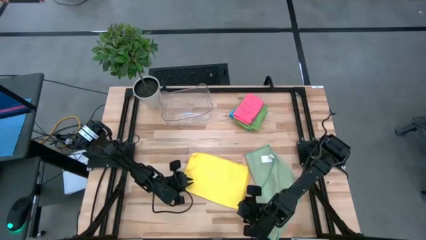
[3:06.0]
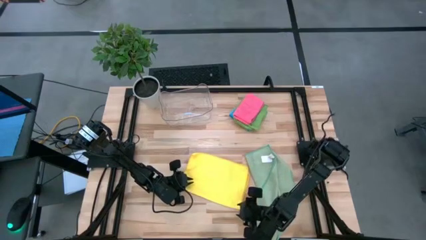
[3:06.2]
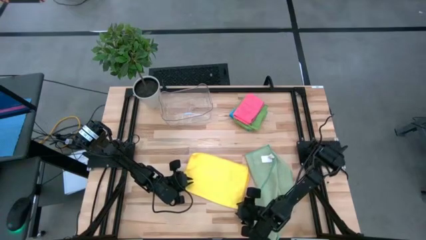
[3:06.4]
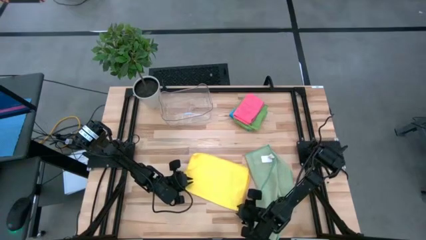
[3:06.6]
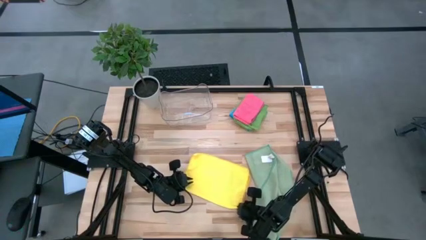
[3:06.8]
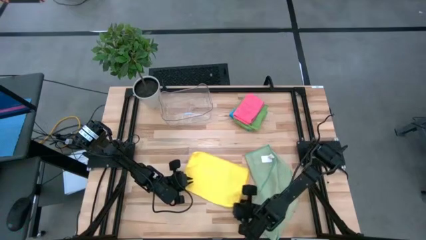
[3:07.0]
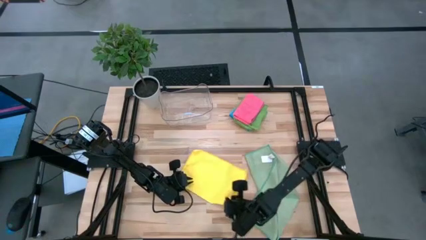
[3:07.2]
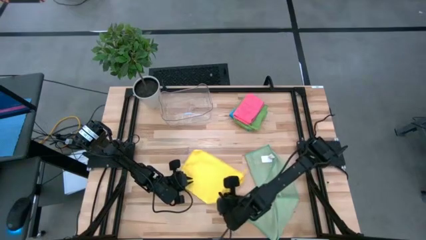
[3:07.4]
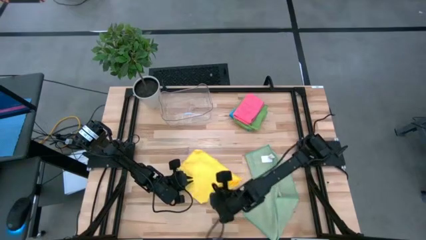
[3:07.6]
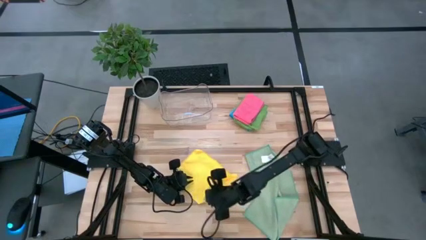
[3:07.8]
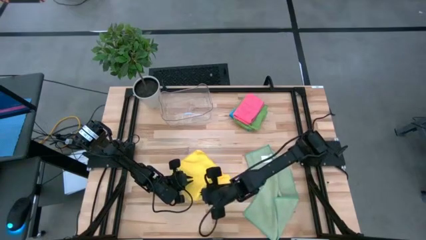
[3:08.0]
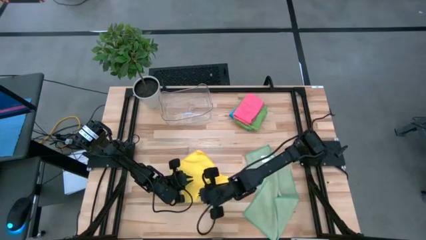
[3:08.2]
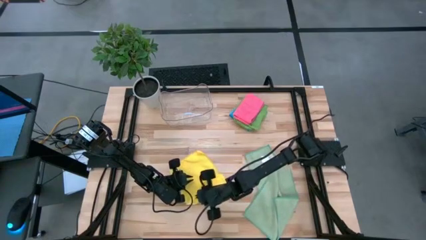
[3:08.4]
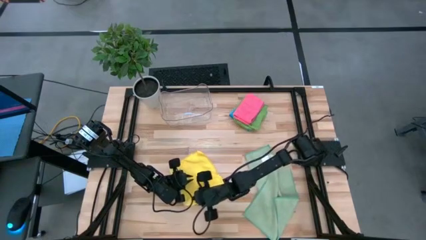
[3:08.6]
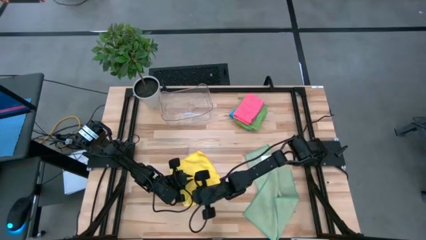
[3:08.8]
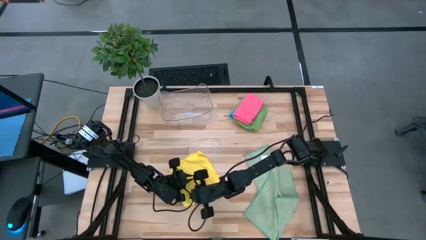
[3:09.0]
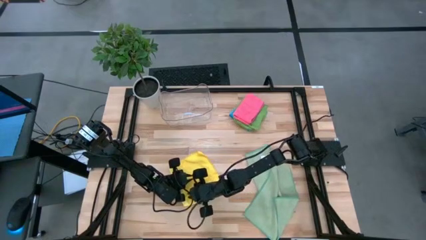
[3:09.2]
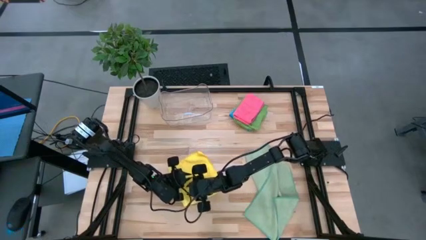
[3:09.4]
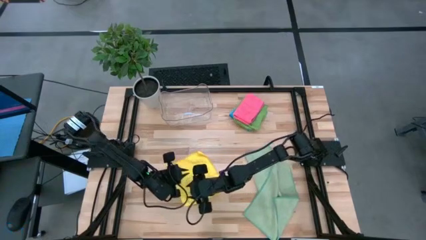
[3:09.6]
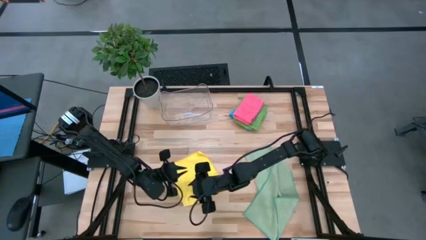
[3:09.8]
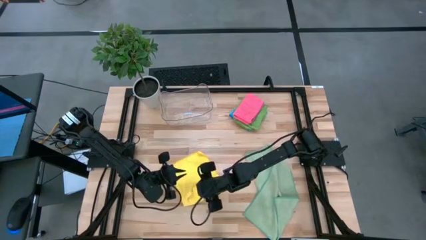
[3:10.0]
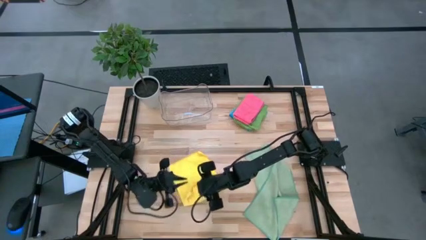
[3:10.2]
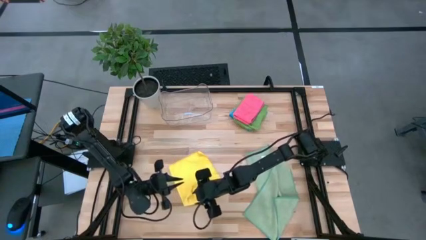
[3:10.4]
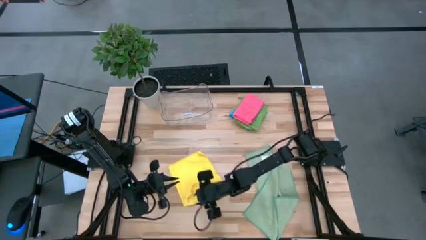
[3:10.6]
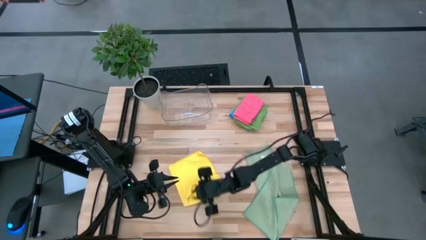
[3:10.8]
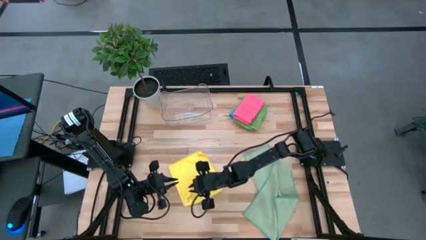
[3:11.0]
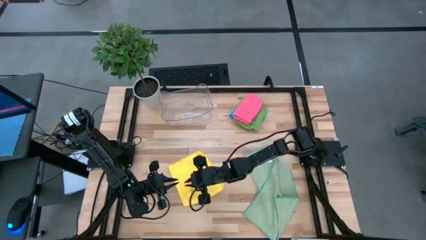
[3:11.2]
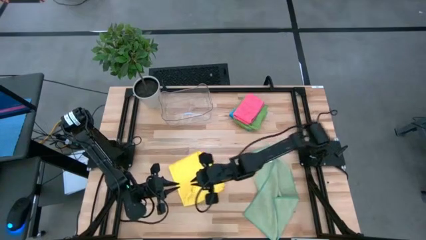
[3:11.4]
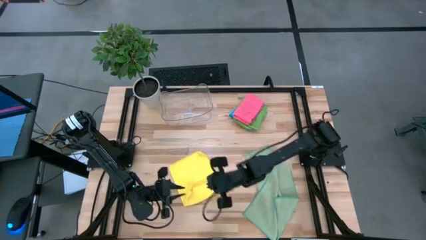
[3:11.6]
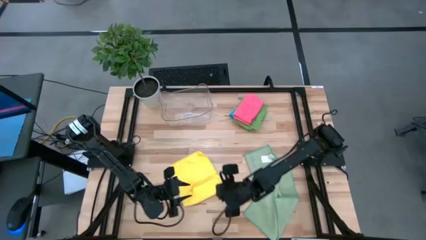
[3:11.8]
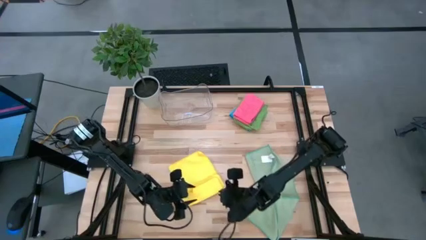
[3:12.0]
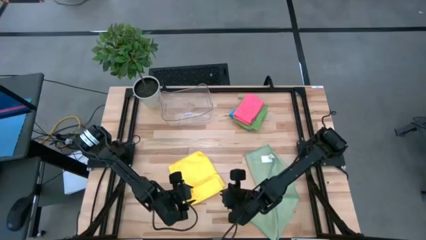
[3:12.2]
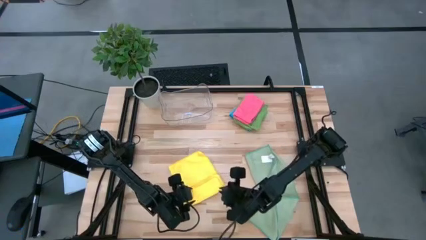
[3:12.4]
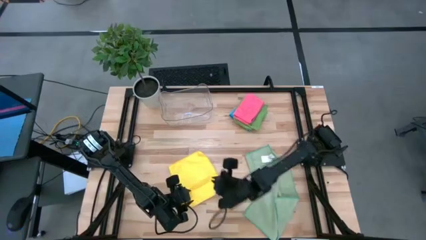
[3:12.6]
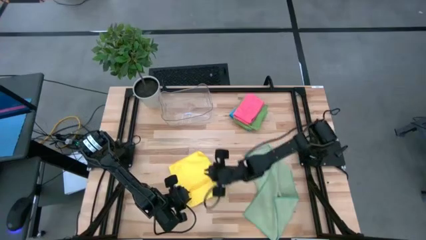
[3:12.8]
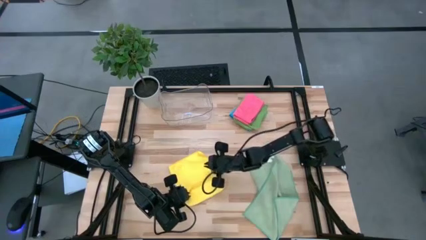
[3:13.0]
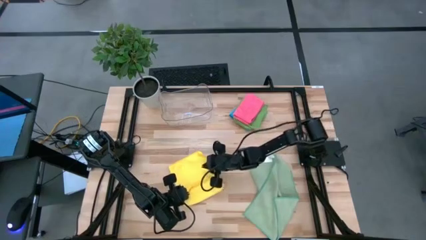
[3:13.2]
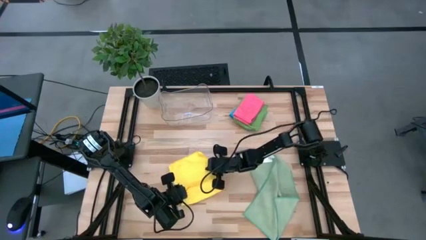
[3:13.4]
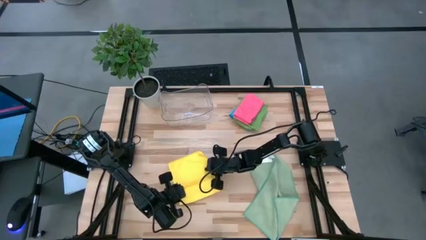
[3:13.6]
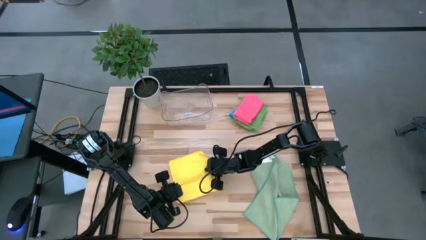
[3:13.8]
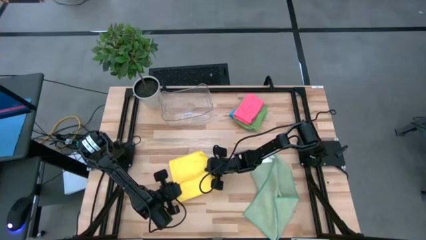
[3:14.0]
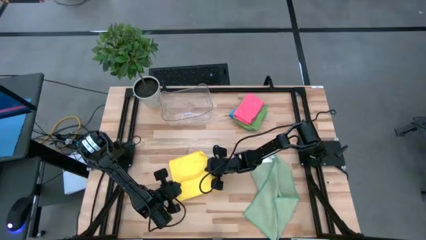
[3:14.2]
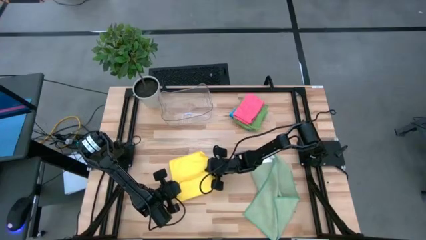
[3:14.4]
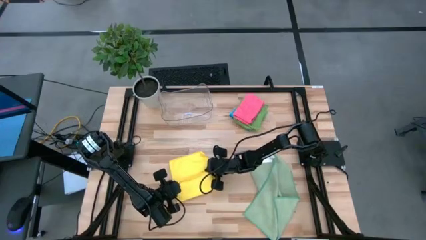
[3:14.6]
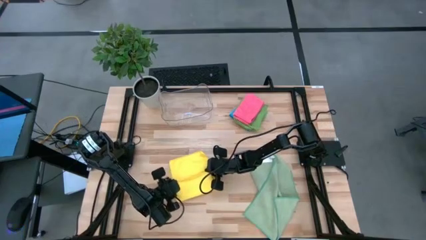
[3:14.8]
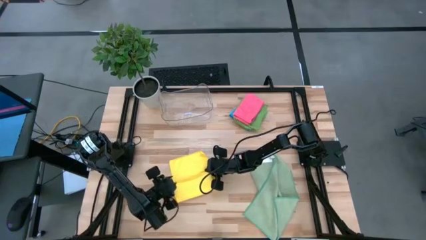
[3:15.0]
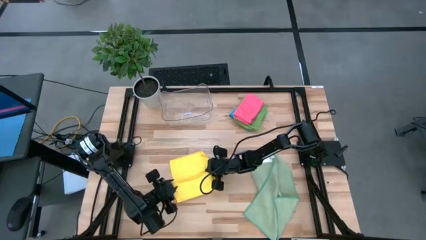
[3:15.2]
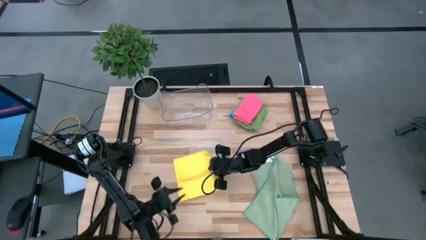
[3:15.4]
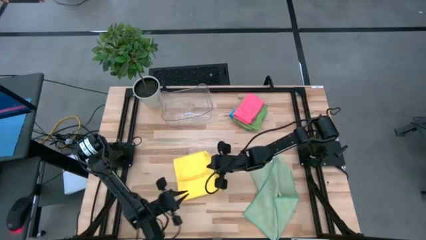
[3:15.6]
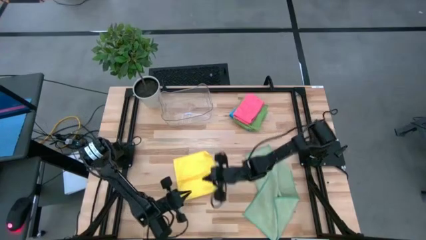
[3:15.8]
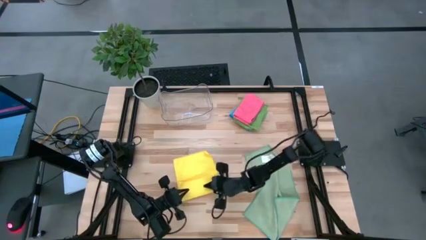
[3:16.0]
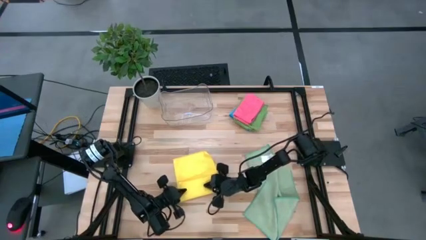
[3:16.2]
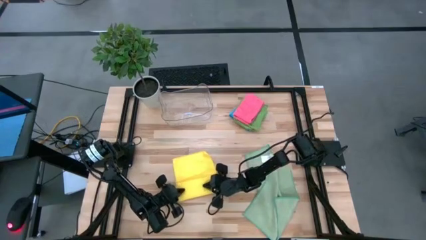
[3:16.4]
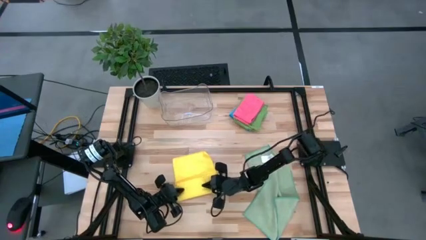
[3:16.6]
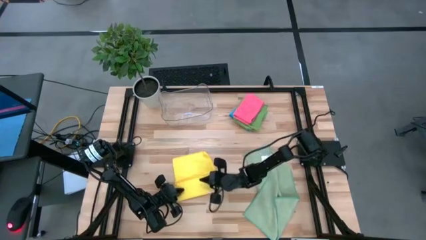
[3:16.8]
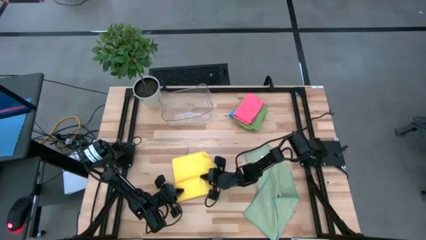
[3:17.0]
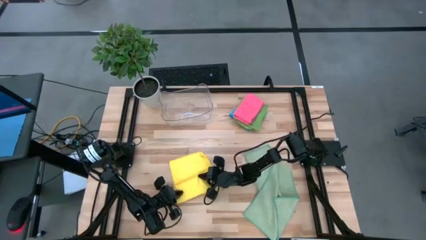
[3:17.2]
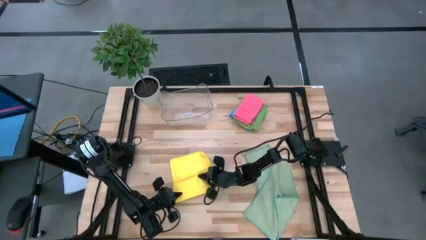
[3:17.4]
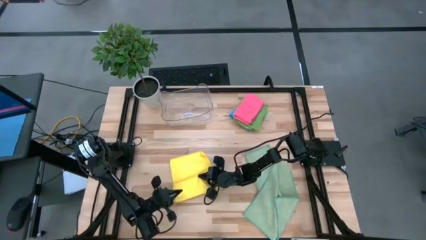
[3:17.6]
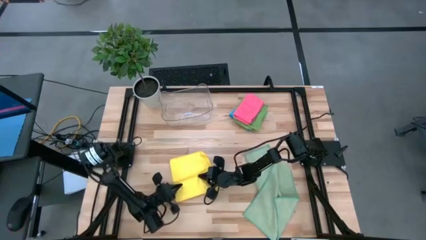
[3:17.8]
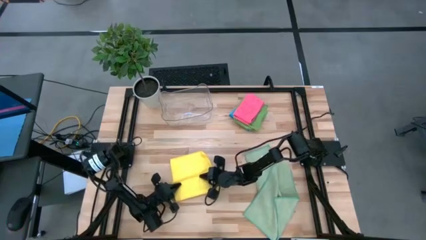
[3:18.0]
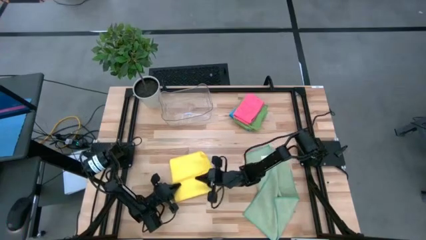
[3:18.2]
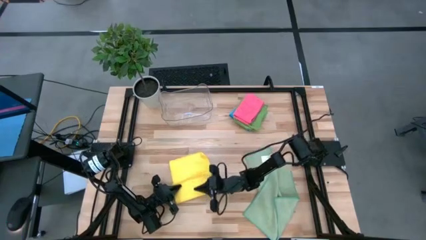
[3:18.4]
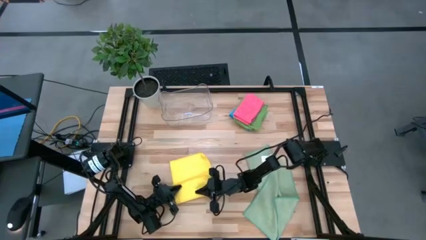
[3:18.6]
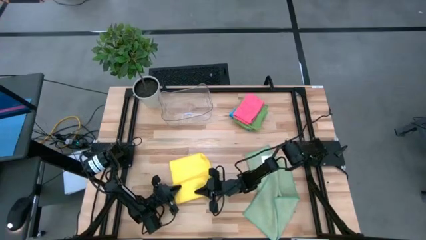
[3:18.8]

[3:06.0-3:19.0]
Task: Fold microfiber towels
Fold the yellow microfiber cloth

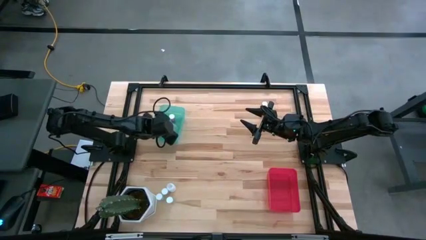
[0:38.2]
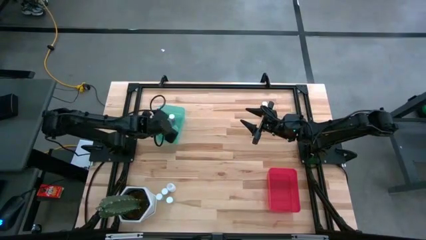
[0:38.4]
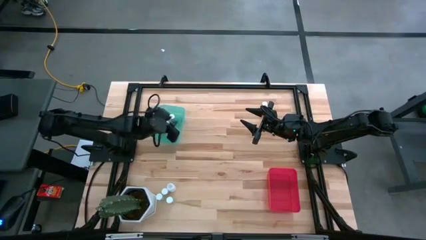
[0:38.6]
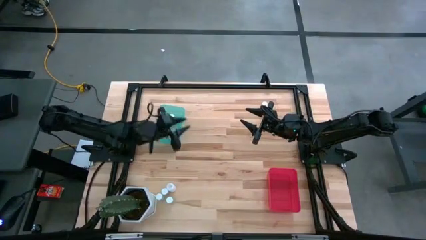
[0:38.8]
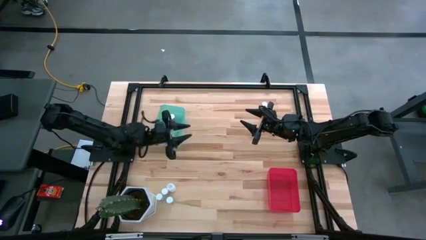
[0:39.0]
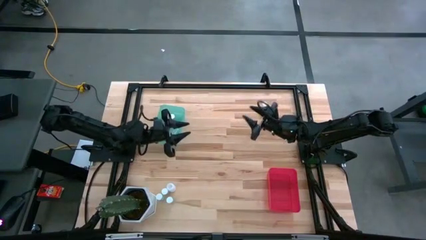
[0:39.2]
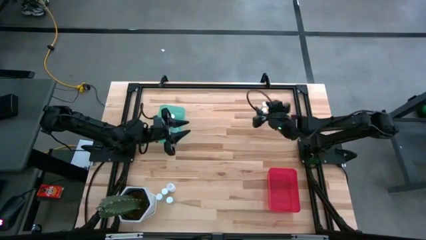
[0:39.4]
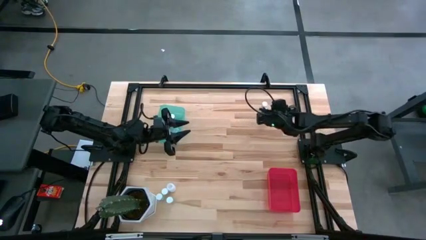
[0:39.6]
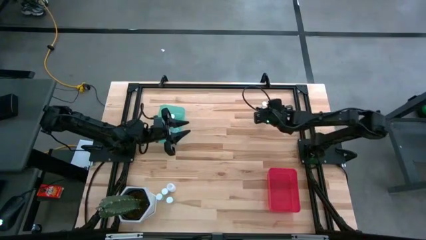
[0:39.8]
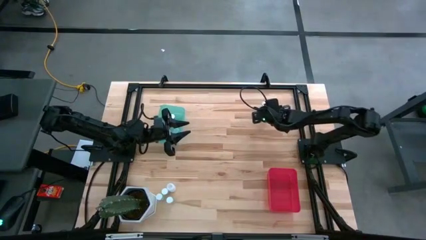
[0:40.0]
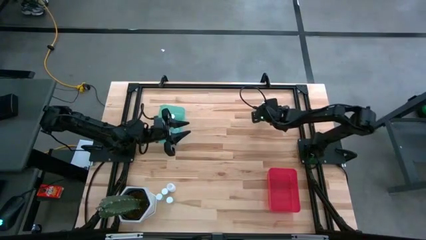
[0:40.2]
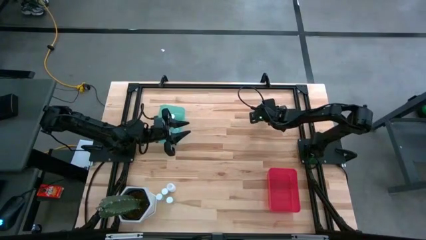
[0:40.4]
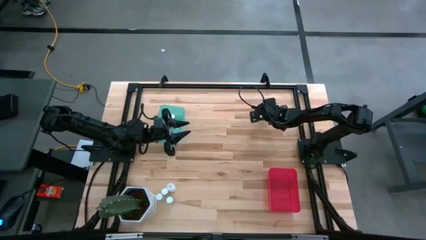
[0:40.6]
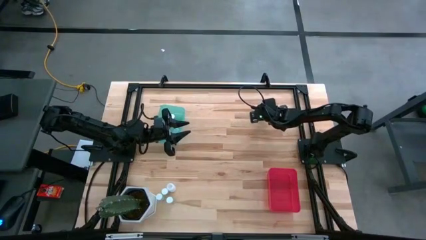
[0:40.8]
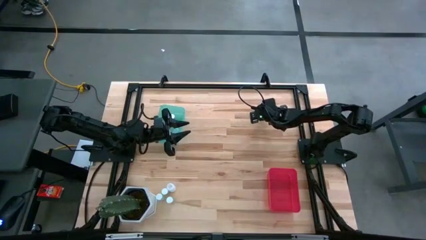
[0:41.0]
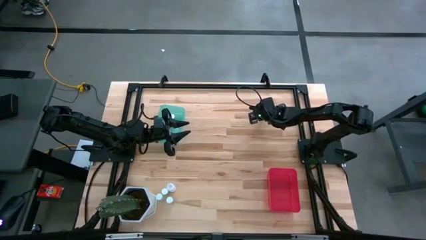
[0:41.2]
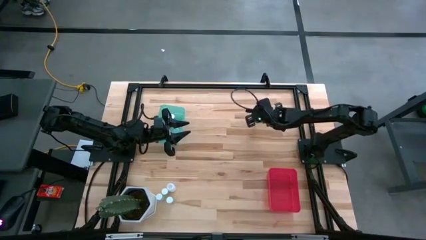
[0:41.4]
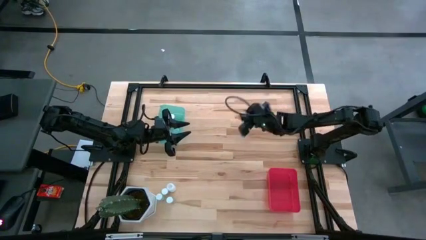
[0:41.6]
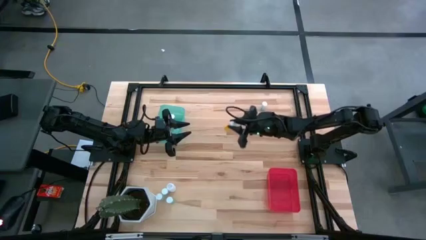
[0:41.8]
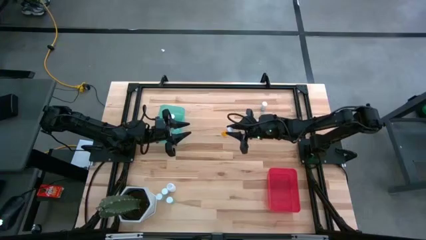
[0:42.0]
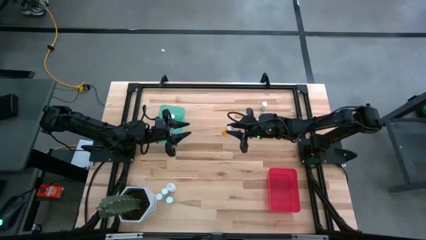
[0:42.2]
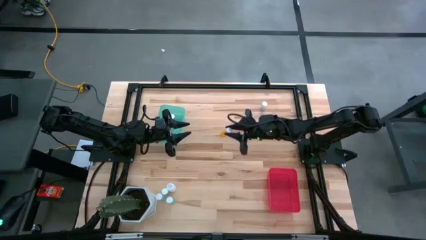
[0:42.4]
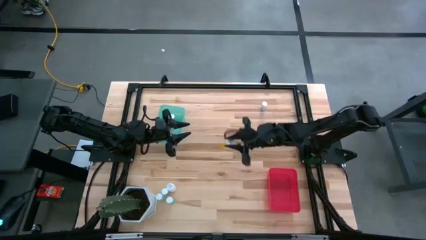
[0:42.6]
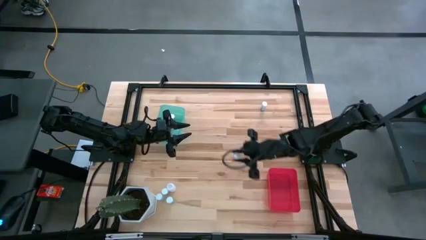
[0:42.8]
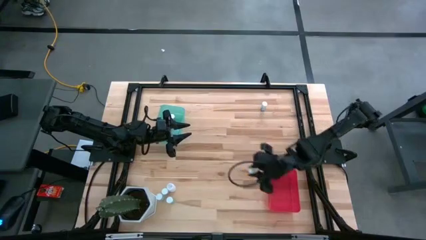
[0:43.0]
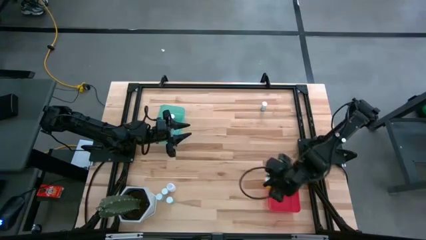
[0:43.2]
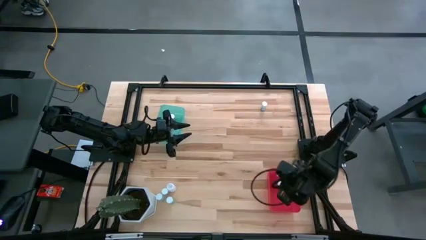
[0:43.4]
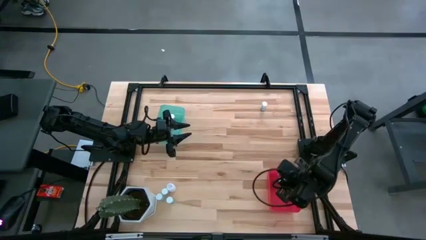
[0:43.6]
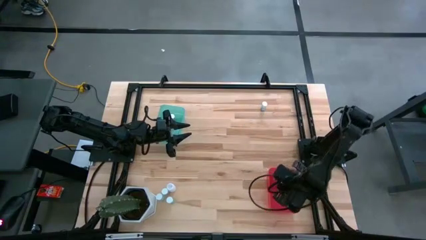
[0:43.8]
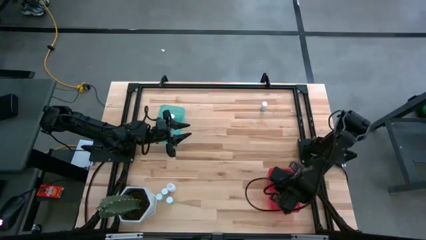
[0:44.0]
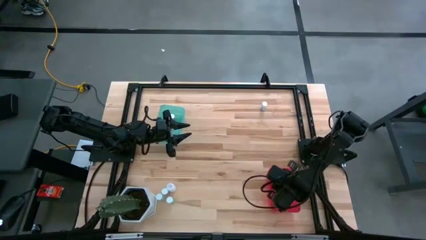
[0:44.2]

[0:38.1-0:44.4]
Task: Pick and place medicine bottles into bin by pill shape (circle, oval)
Put the orange tablet bottle into the red bin
